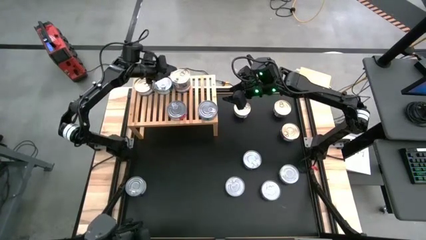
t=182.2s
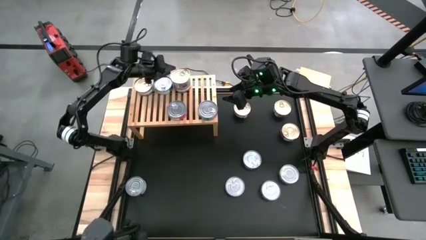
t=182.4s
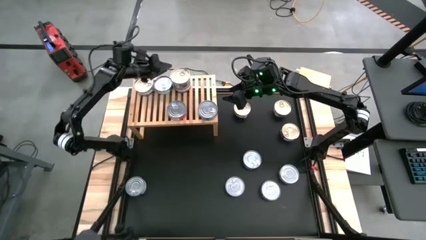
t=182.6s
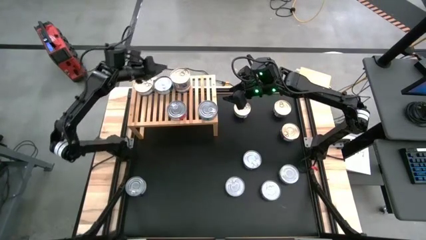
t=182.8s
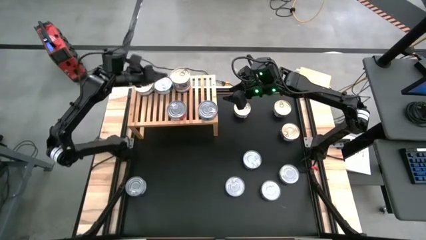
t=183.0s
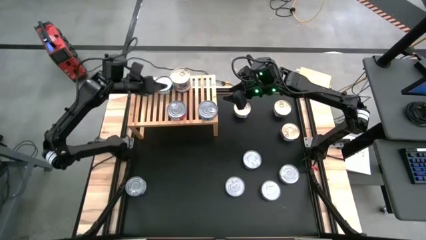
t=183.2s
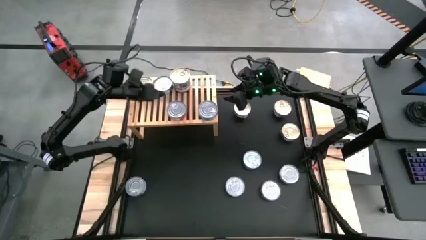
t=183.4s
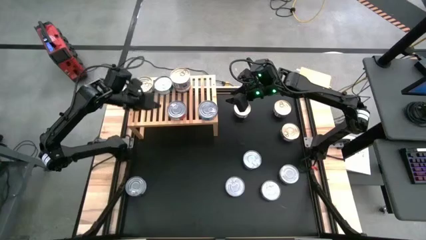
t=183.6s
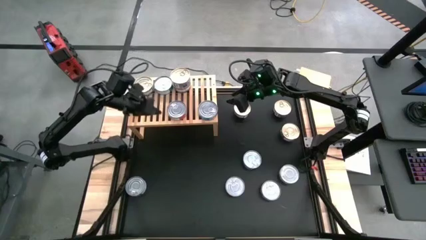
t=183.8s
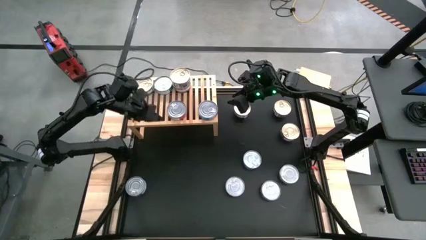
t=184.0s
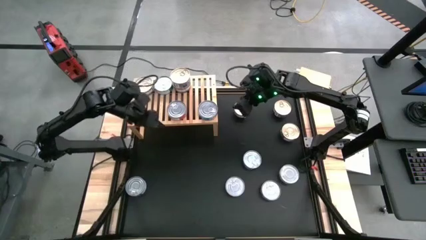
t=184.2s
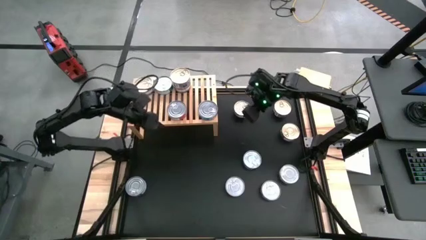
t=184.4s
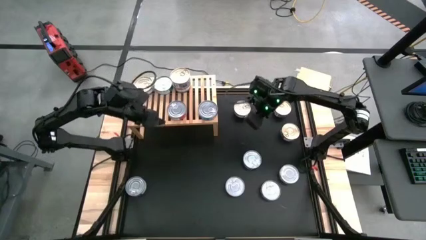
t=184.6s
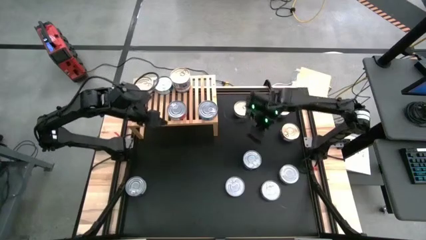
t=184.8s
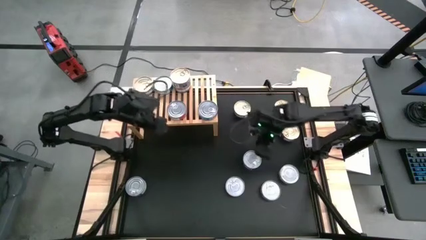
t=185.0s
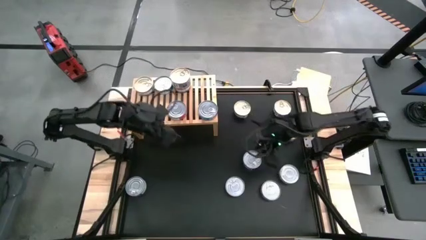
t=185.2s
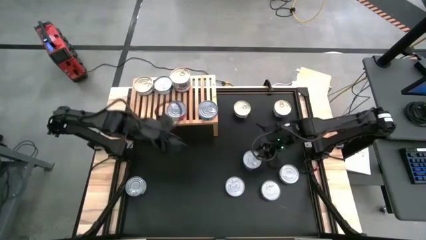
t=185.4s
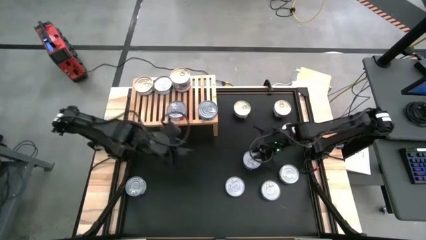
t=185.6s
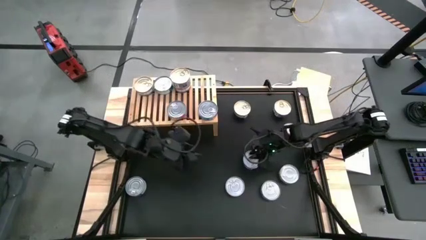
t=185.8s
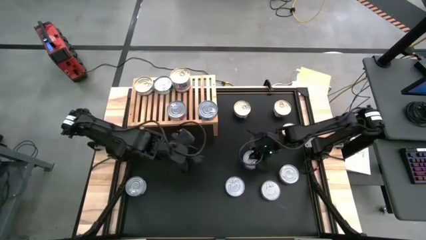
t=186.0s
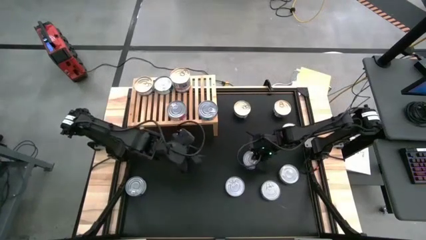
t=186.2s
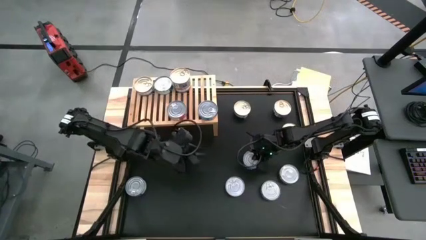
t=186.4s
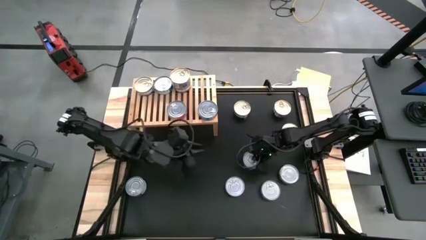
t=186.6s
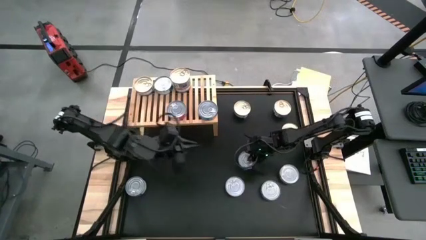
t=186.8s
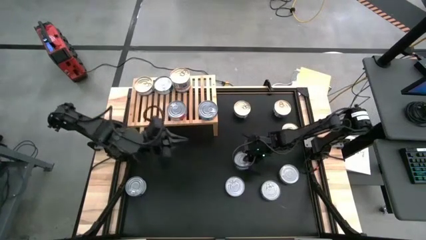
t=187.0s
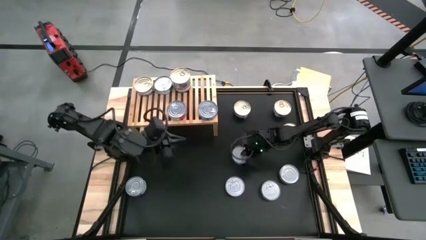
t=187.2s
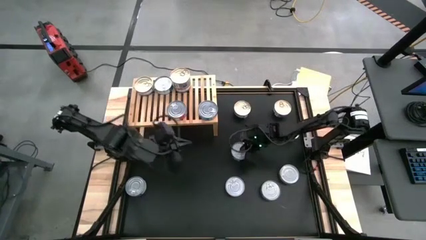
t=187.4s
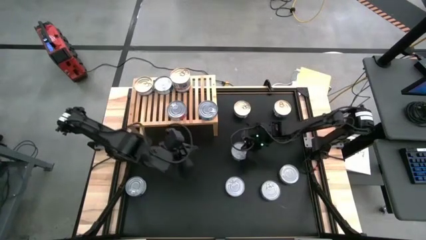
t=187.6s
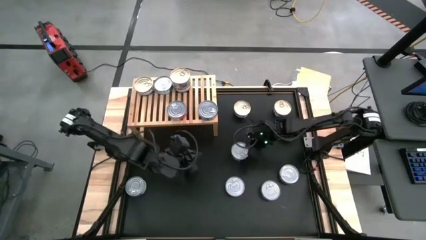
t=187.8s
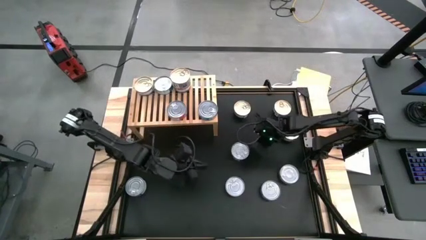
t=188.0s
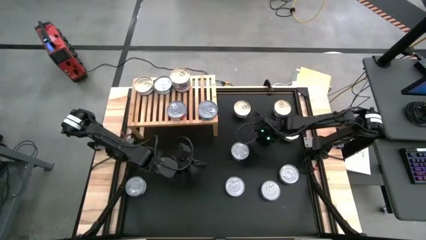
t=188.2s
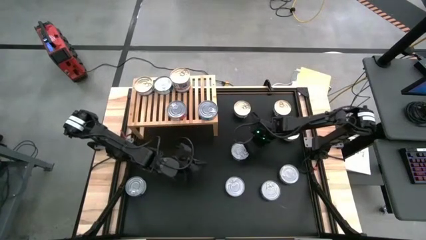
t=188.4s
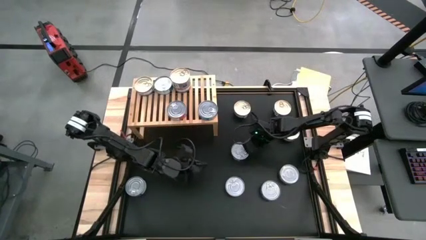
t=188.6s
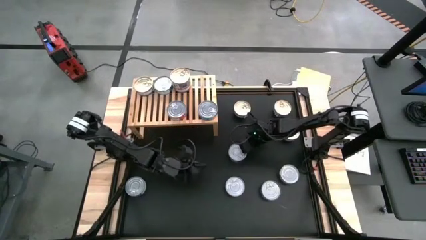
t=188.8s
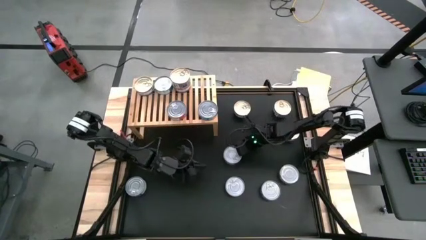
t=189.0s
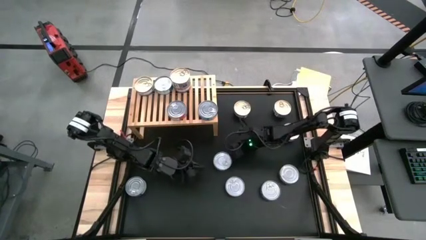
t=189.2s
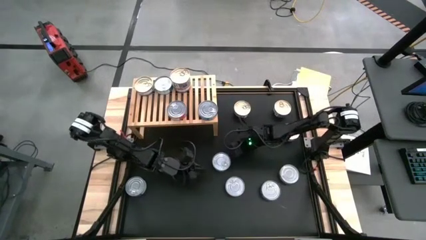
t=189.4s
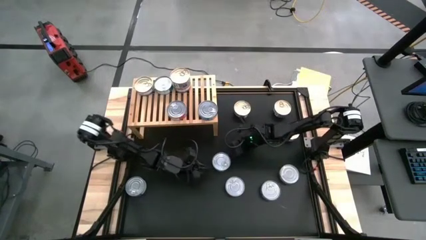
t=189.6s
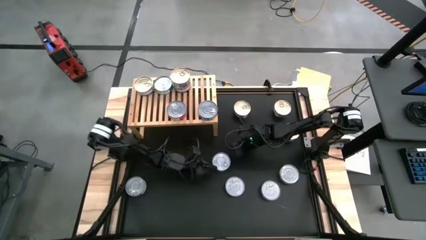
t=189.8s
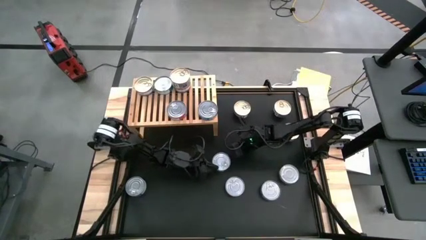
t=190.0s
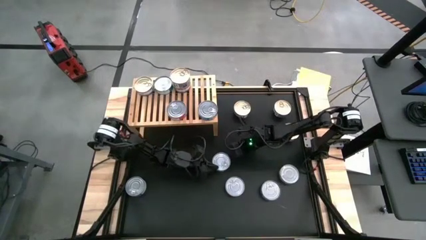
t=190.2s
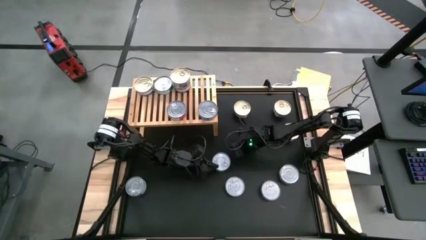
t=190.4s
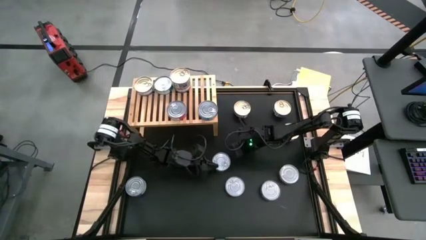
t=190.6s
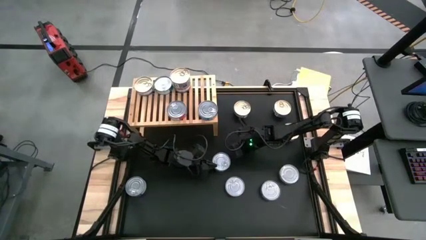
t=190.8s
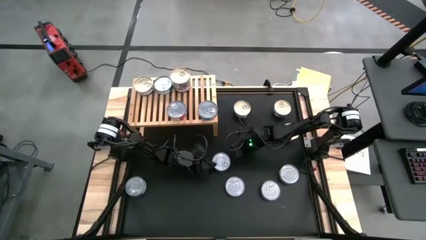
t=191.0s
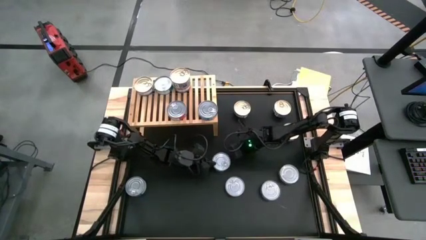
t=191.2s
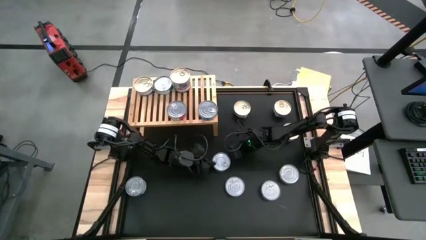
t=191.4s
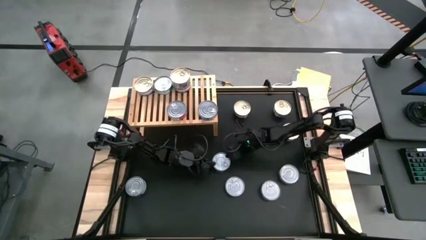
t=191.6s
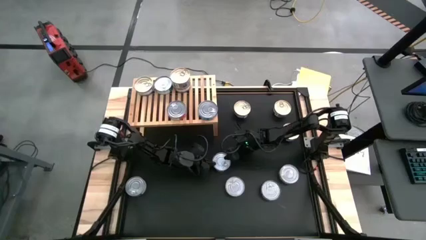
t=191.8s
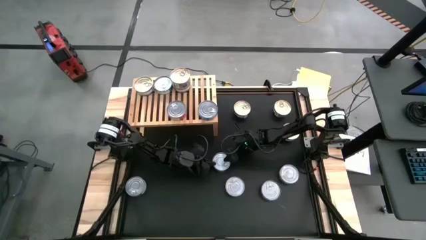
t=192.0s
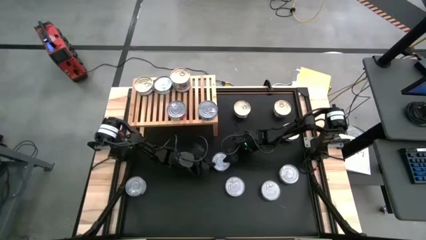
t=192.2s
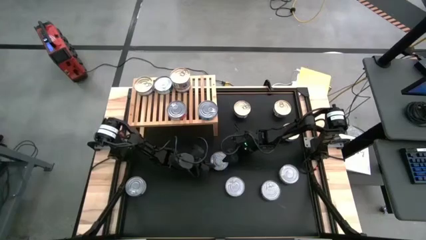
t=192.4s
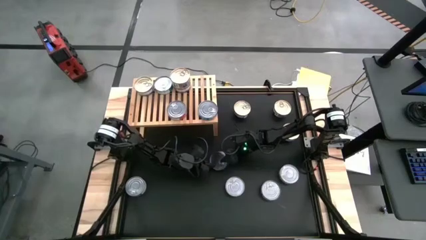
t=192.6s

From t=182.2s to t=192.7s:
Task: Stack canned seafood by type on shelf
Put the top blue tuna can on the shelf

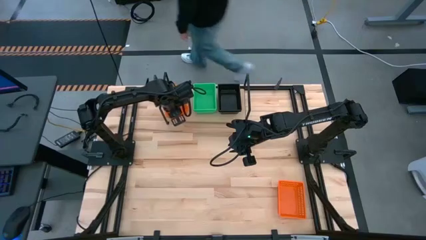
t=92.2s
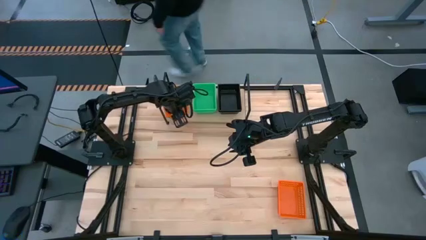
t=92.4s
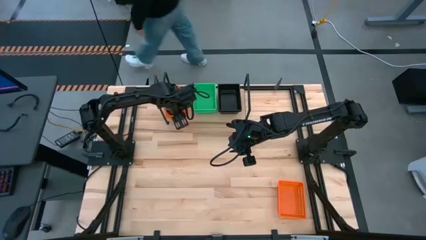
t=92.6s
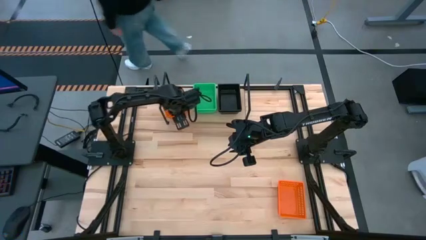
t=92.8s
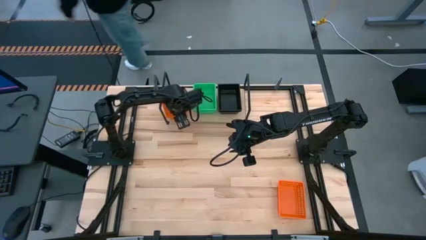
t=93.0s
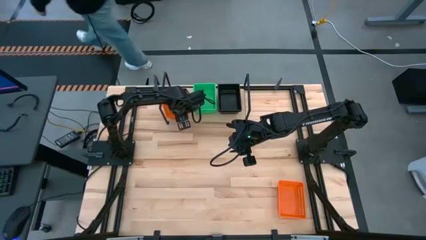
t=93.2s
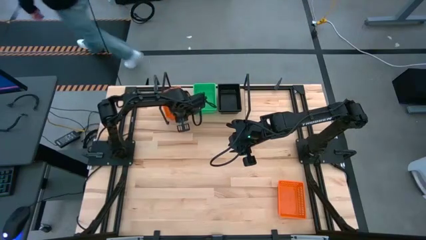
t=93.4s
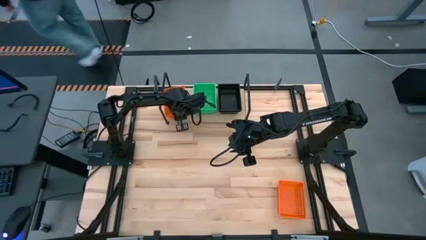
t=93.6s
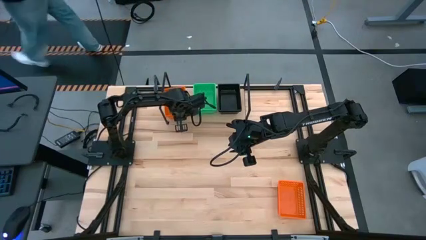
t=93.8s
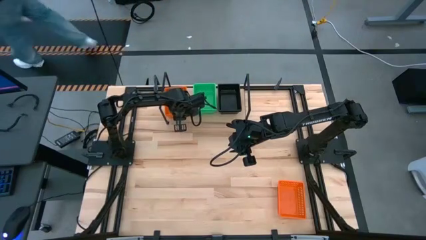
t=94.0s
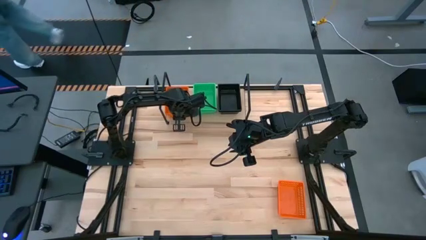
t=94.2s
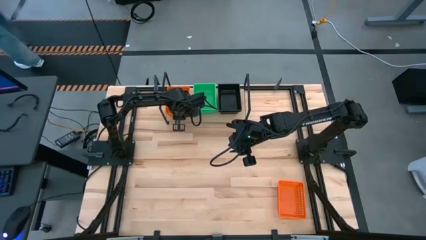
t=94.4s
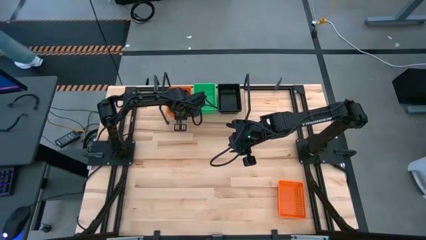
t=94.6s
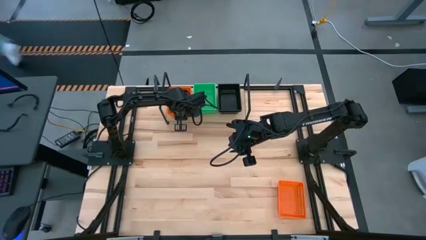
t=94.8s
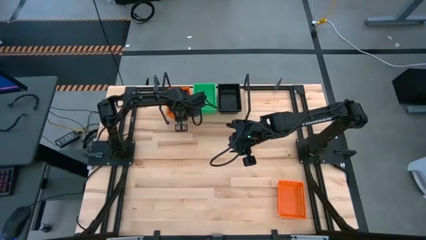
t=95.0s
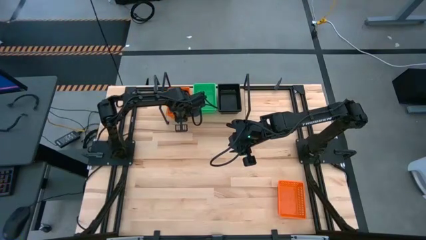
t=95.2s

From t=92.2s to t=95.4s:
Task: Stack baskets on shelf by color
Adjust the stacked orange bin on the shelf
